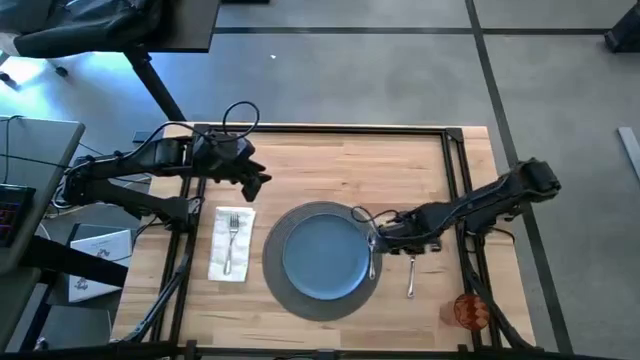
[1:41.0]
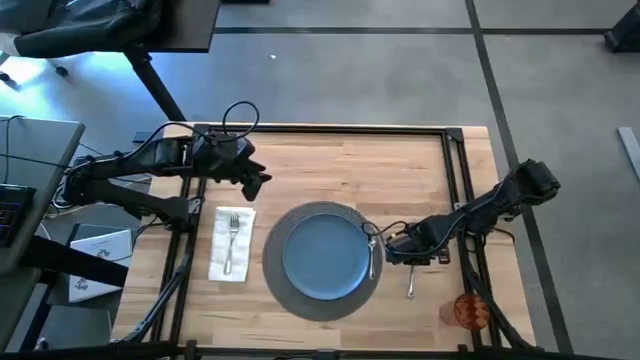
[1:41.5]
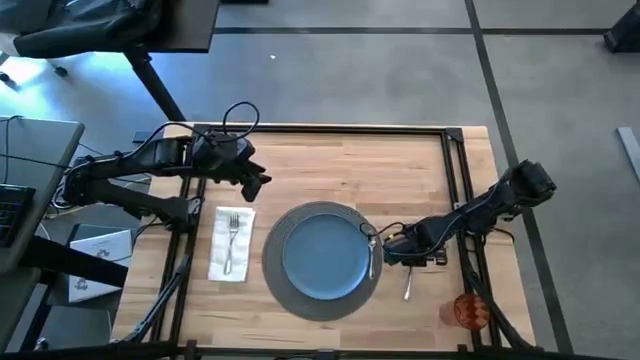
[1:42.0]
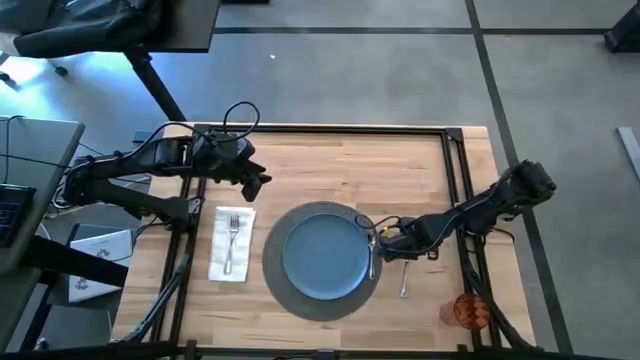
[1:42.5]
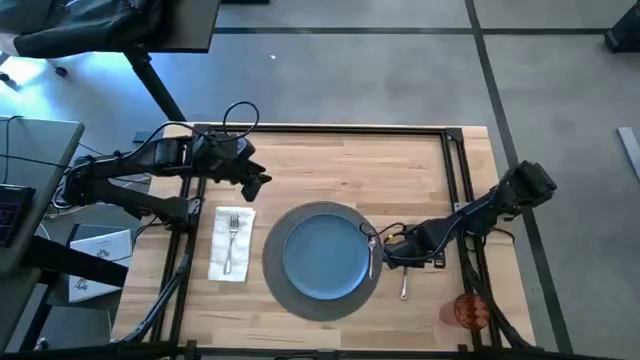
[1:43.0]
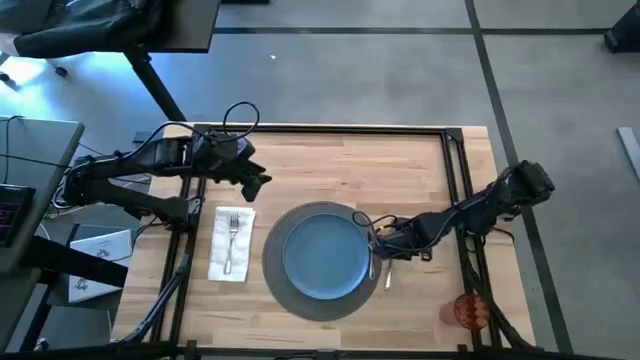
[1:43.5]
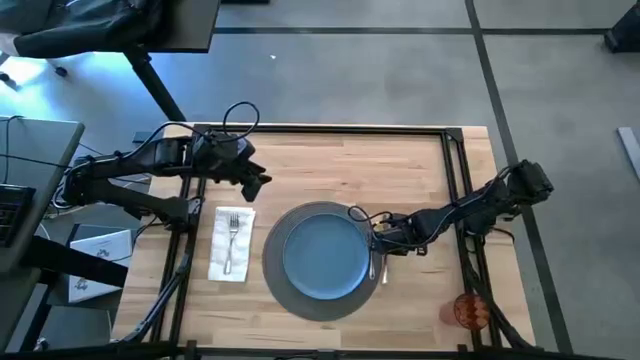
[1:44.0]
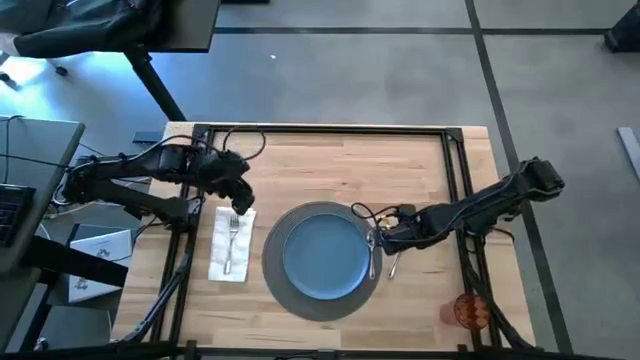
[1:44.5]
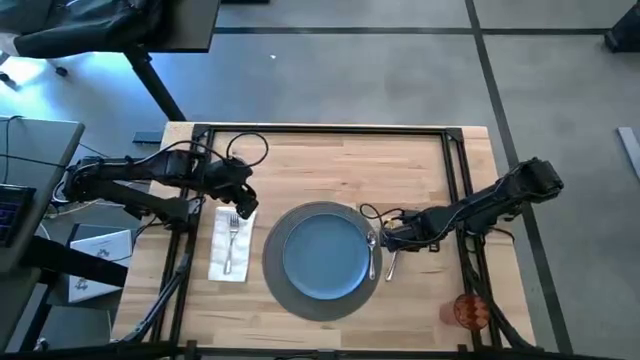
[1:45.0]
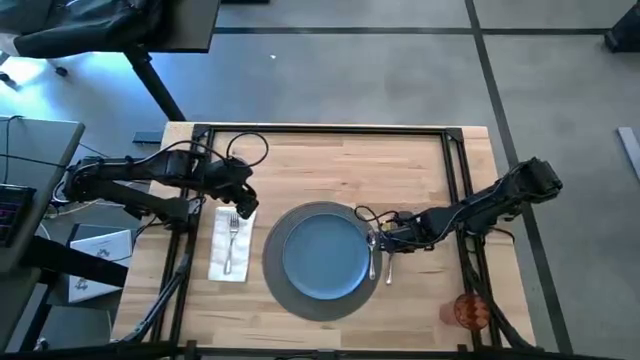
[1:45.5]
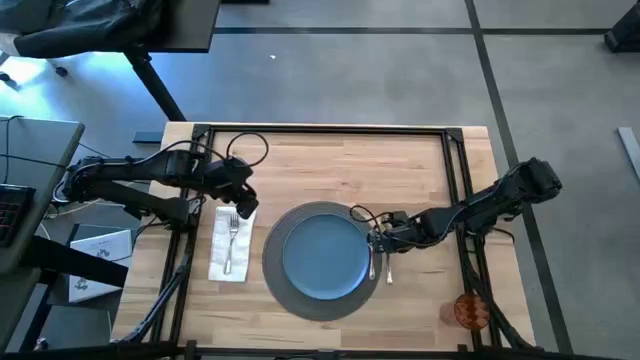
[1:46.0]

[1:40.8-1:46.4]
Task: Set table place
Move the silver table knife to the right of the silver spoon

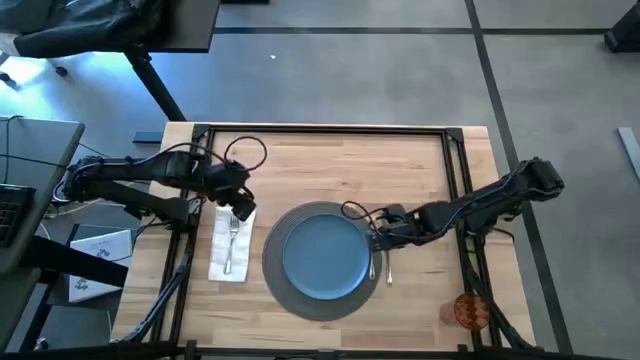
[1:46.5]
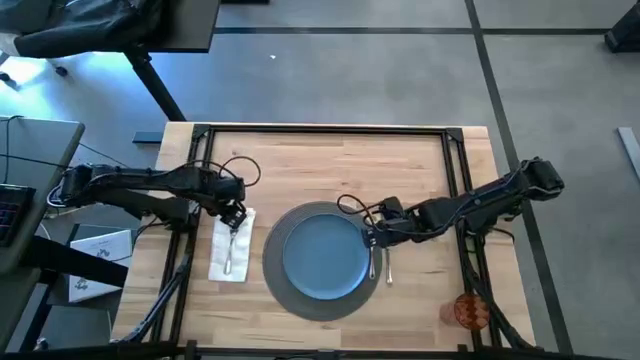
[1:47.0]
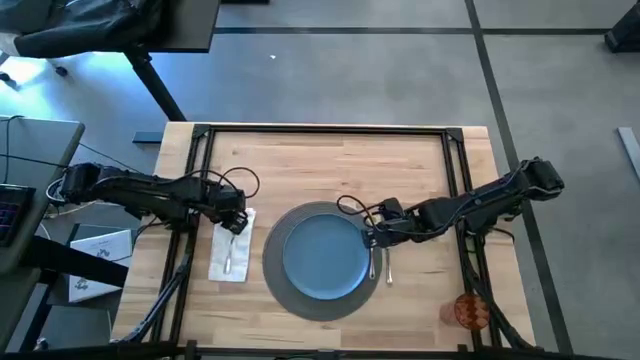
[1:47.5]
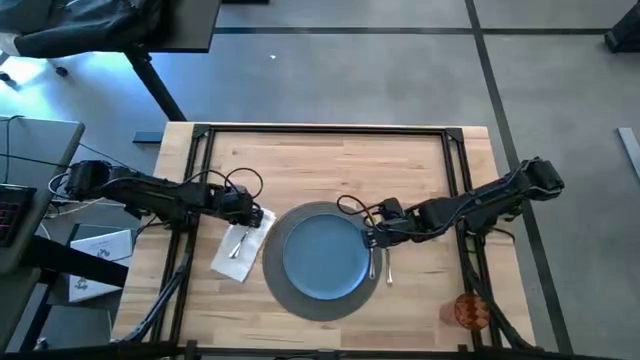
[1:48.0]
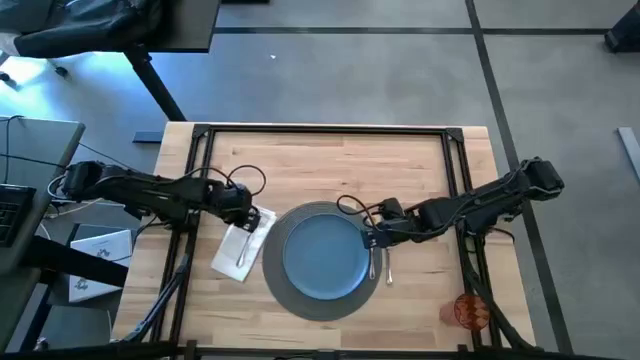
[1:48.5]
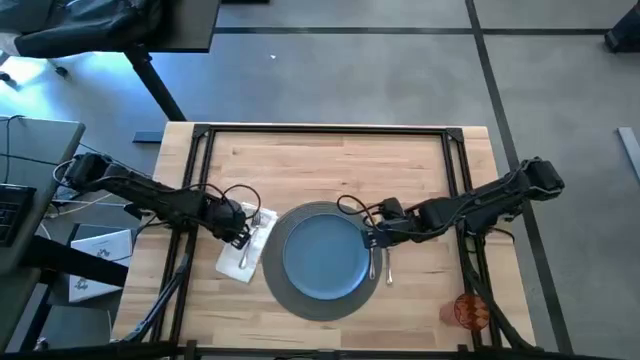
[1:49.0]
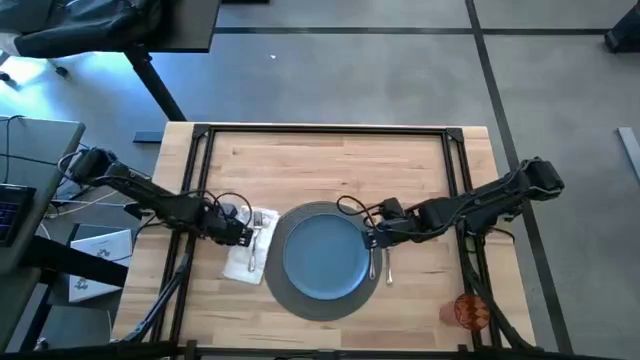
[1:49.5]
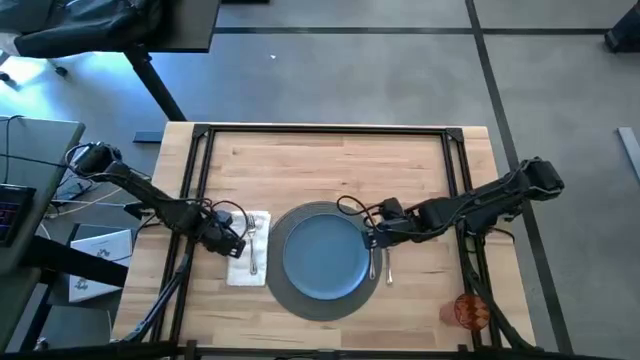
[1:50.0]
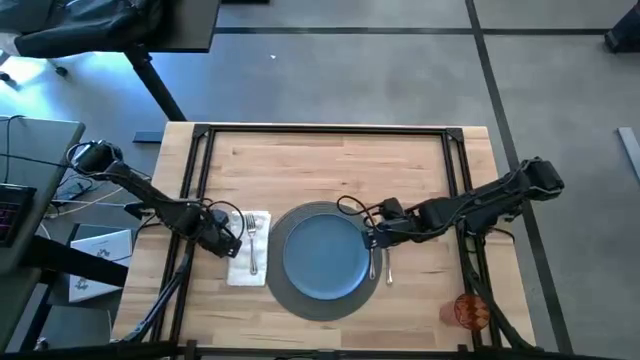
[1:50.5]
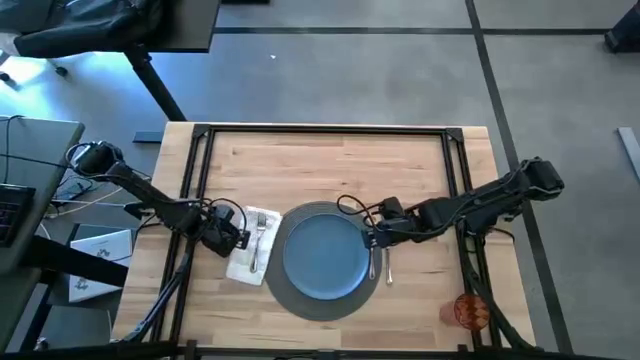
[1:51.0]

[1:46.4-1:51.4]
Adjust the white table napkin

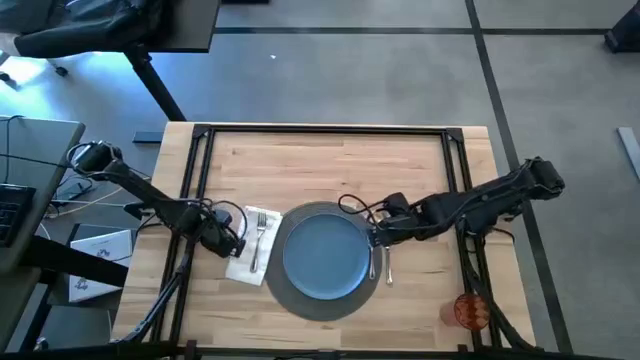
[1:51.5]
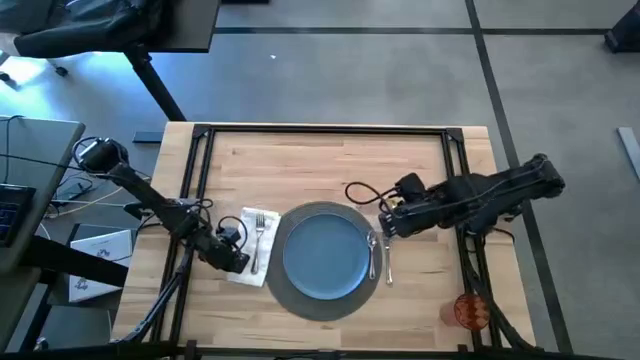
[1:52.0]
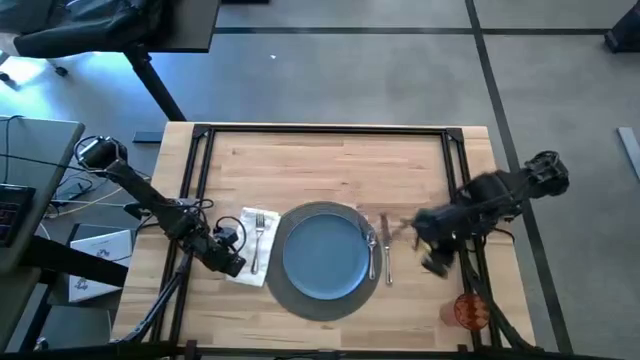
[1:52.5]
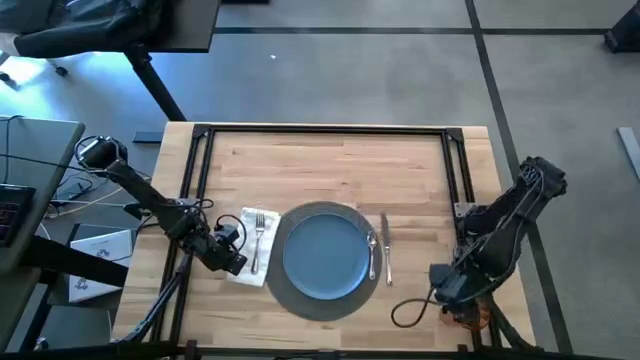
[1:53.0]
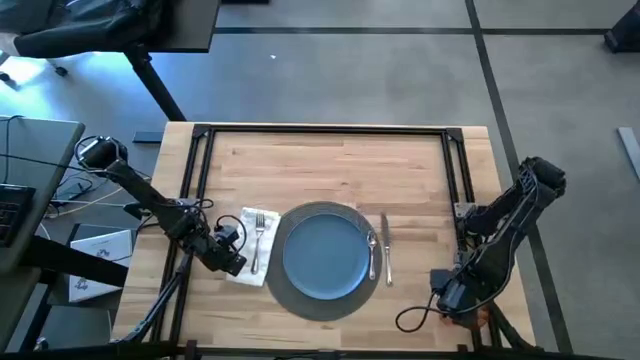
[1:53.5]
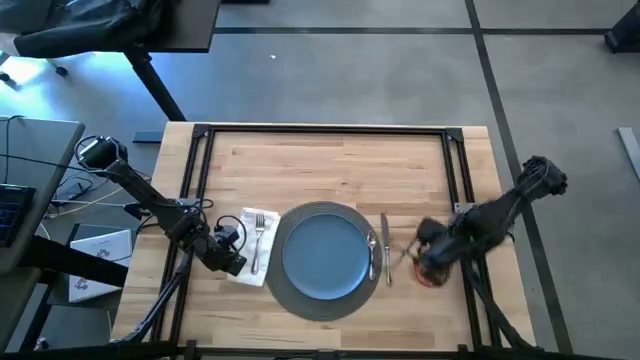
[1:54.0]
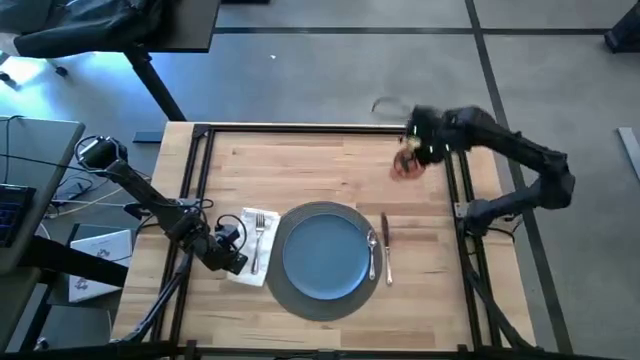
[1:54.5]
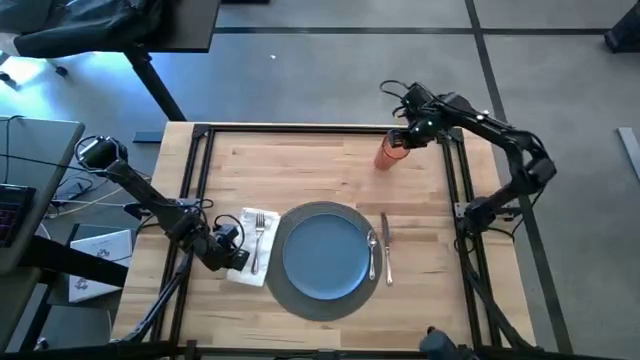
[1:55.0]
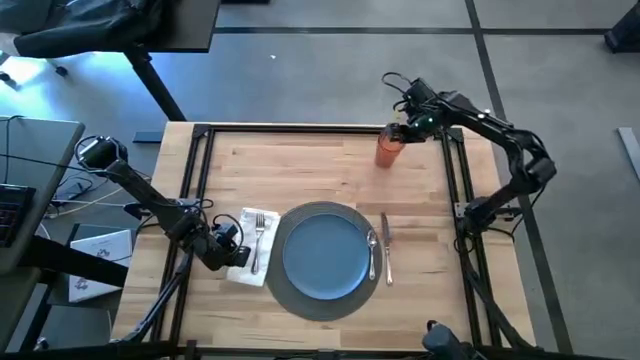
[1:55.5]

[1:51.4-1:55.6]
Move the red cup to the top right of the table mat

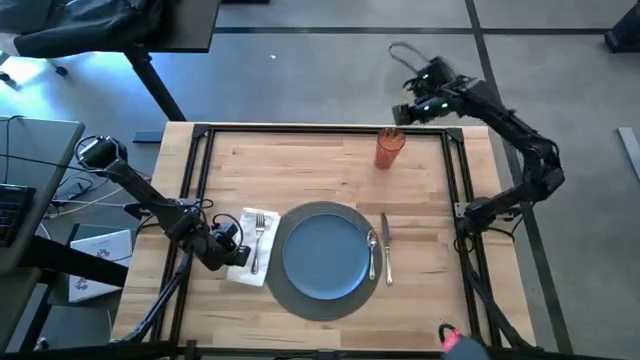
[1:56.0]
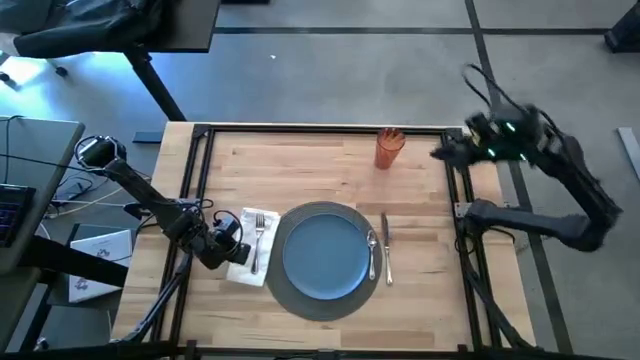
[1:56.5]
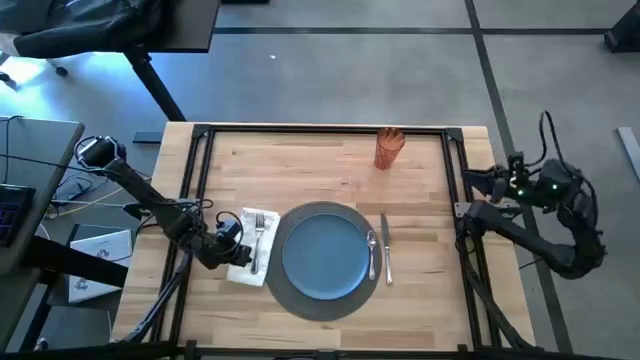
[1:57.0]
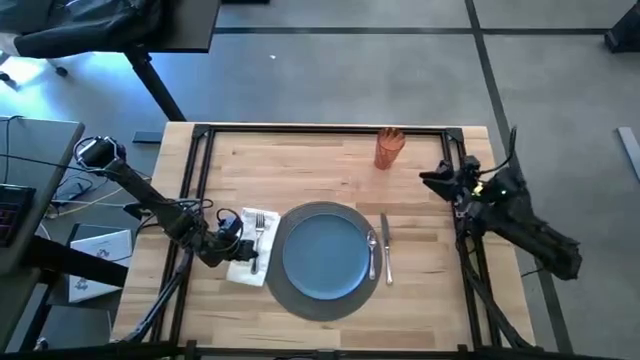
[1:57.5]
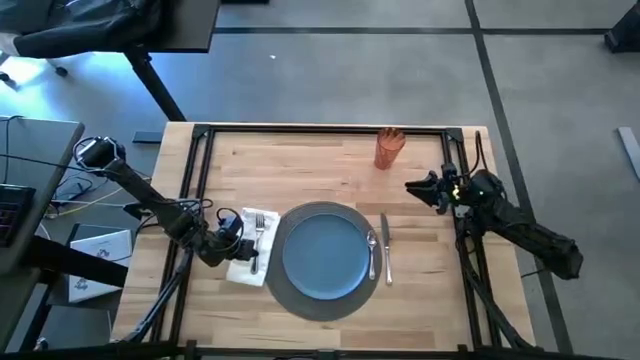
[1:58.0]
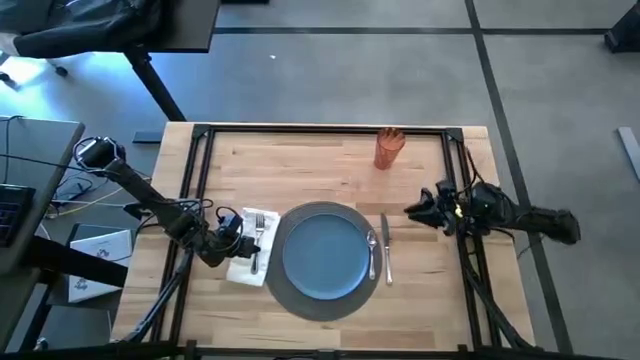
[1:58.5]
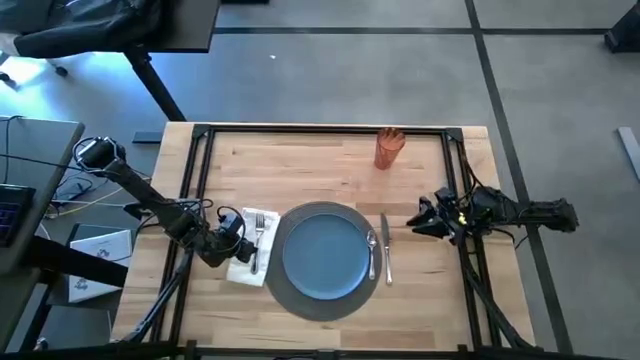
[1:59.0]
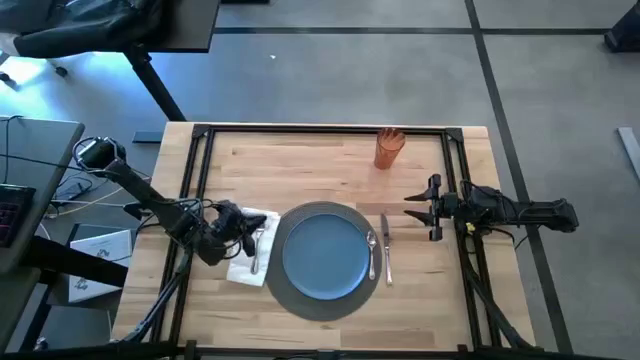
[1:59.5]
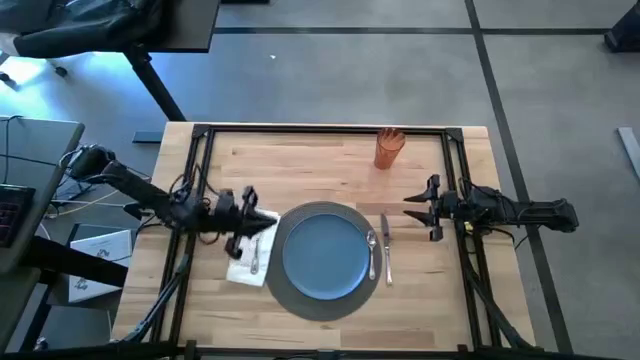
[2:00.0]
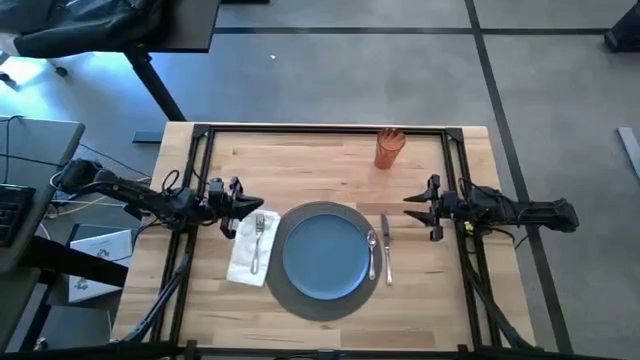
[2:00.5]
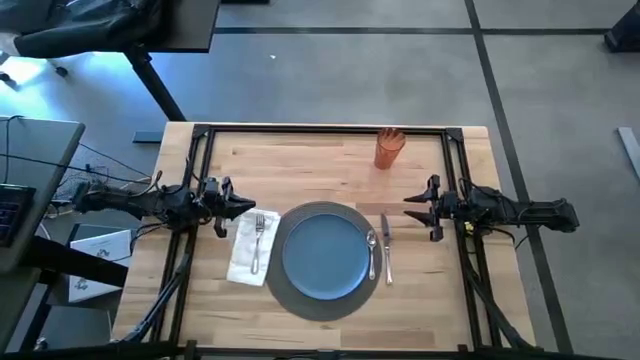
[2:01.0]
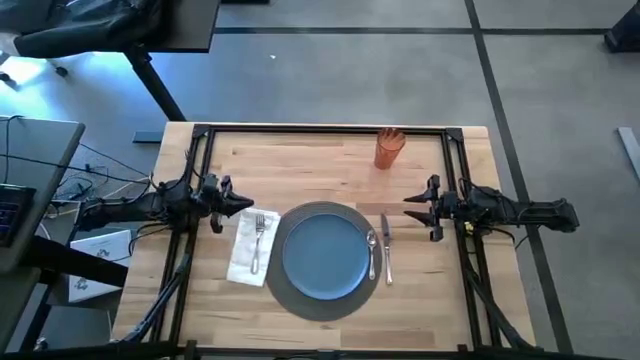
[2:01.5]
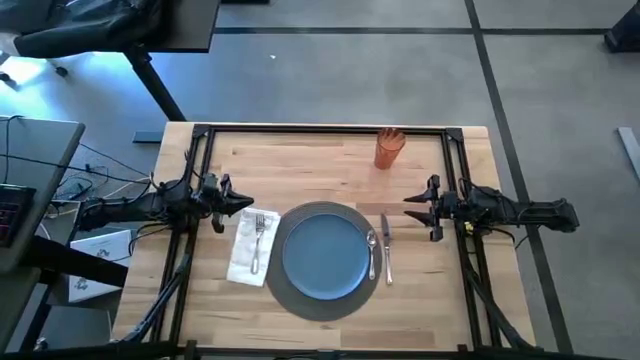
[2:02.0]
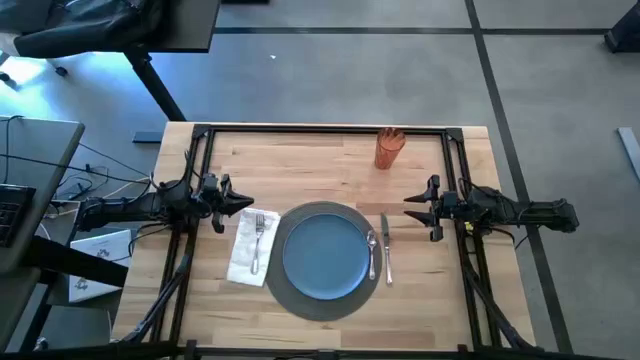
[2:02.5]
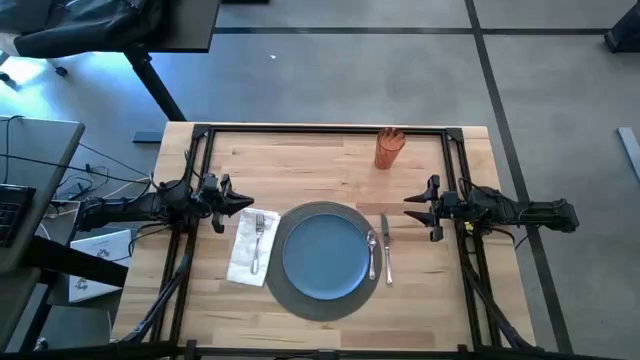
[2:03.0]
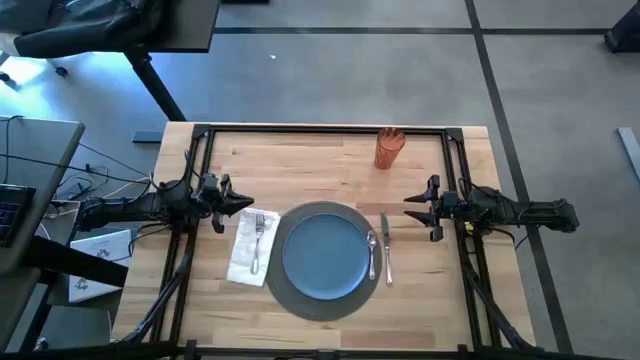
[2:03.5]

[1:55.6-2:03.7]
Return to Home Position
